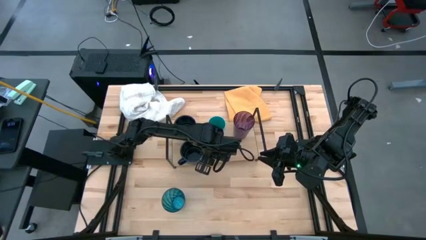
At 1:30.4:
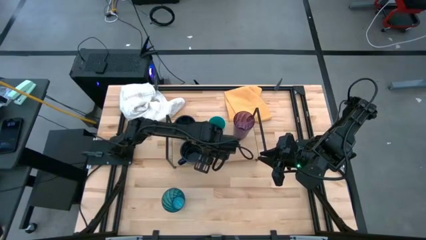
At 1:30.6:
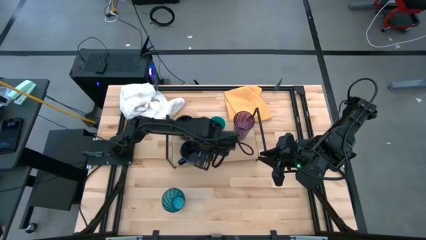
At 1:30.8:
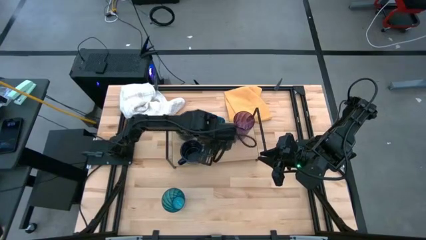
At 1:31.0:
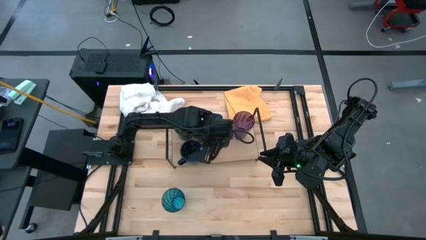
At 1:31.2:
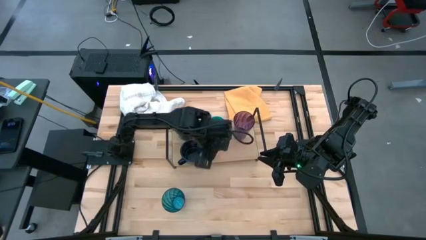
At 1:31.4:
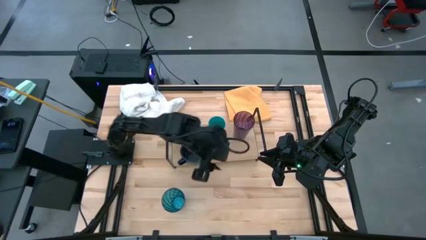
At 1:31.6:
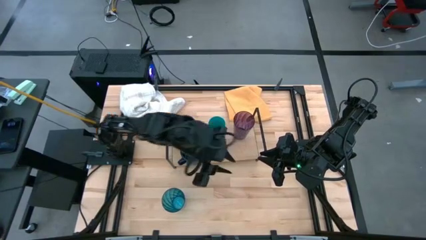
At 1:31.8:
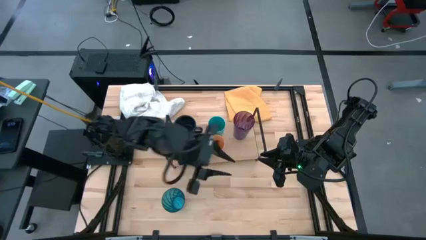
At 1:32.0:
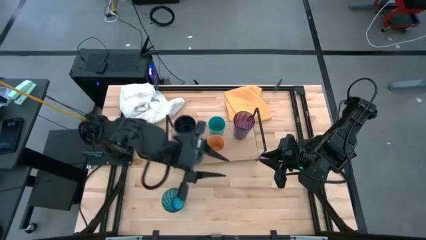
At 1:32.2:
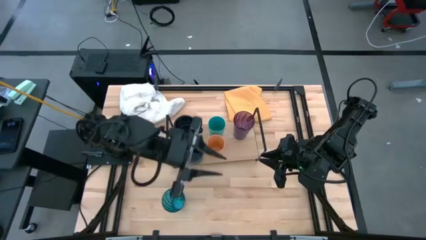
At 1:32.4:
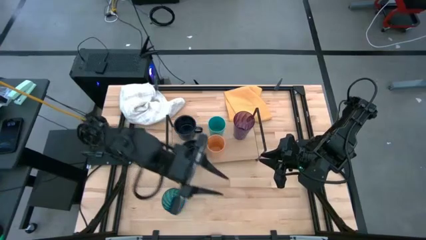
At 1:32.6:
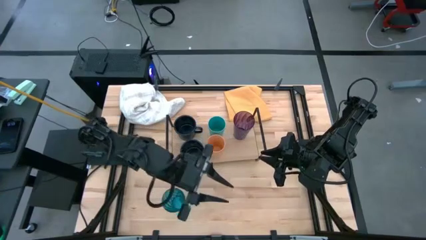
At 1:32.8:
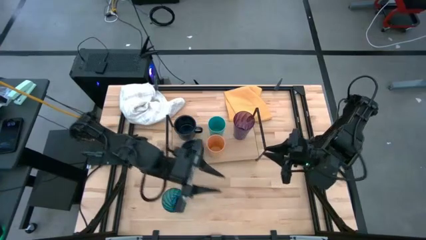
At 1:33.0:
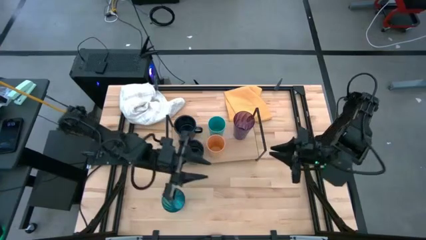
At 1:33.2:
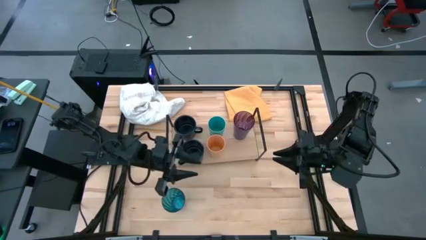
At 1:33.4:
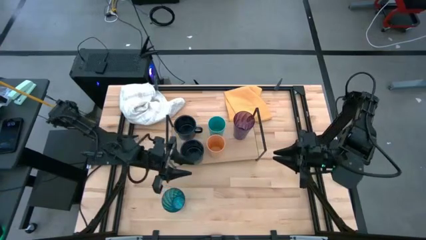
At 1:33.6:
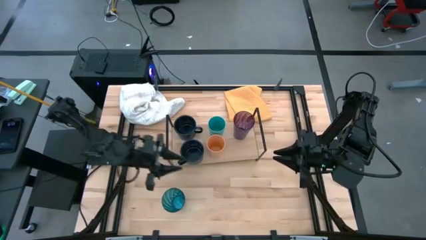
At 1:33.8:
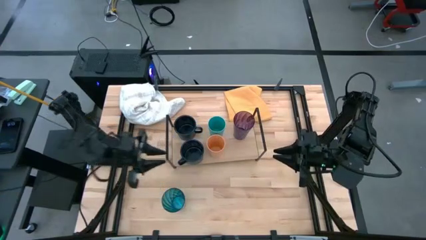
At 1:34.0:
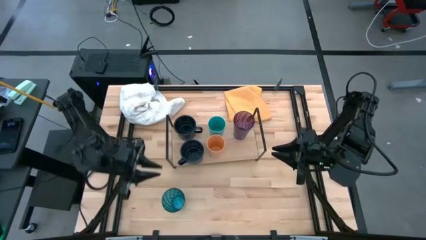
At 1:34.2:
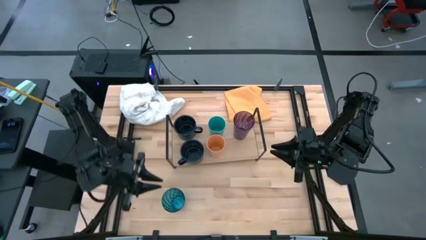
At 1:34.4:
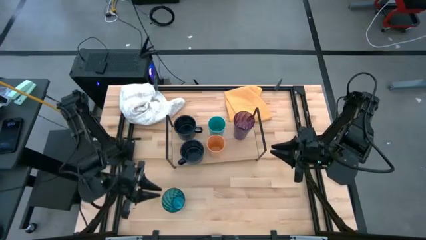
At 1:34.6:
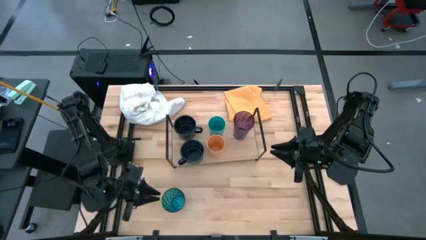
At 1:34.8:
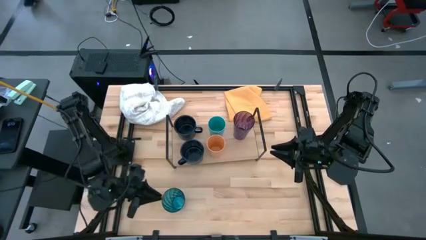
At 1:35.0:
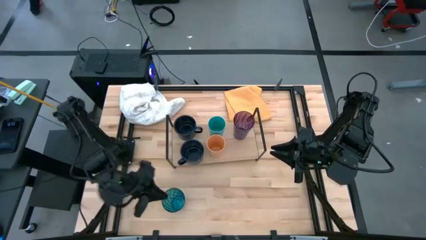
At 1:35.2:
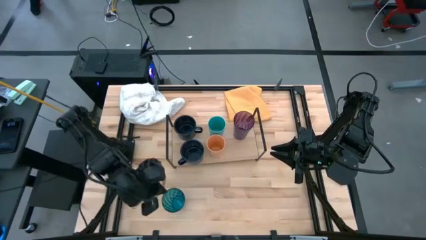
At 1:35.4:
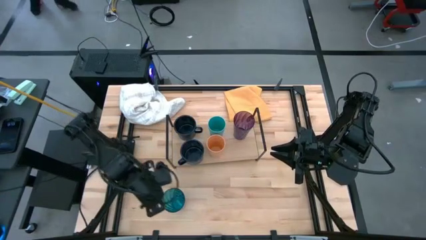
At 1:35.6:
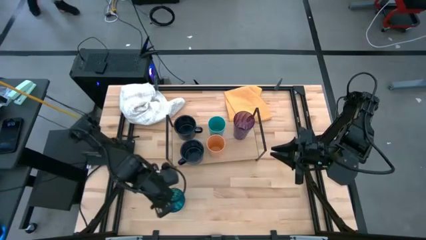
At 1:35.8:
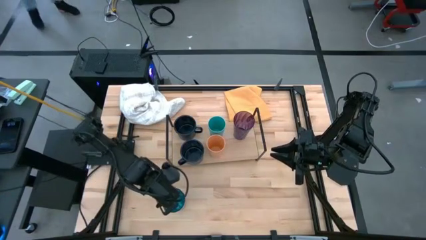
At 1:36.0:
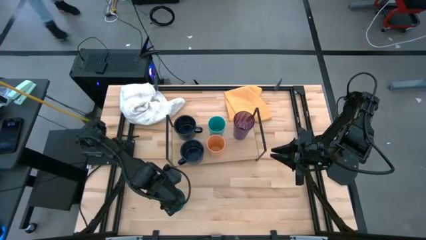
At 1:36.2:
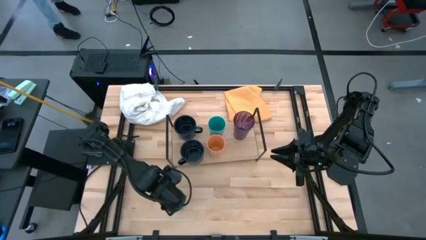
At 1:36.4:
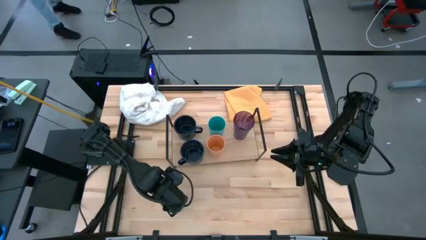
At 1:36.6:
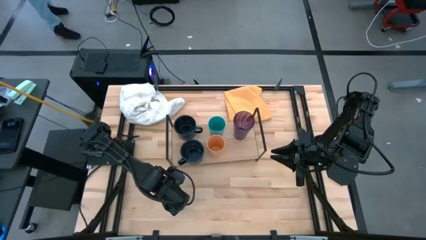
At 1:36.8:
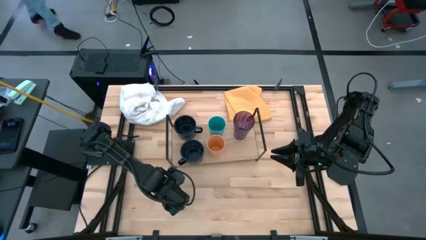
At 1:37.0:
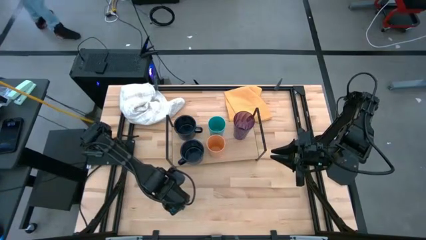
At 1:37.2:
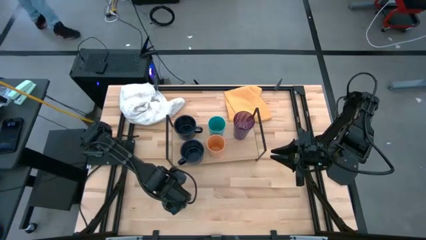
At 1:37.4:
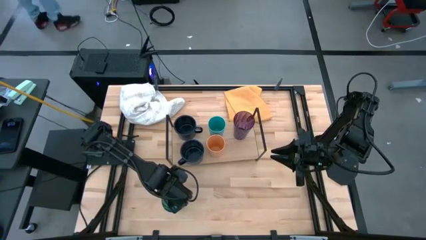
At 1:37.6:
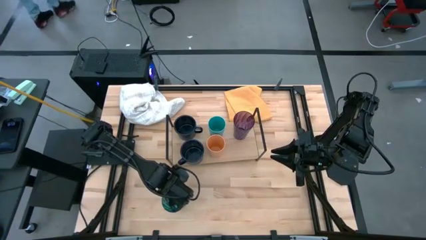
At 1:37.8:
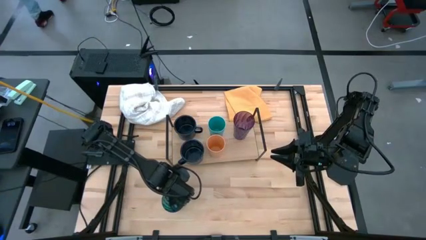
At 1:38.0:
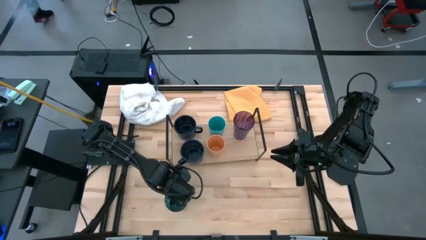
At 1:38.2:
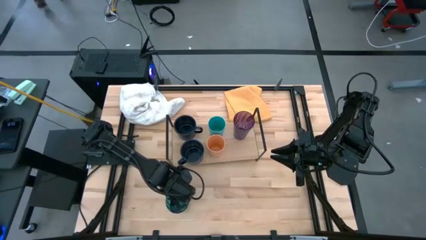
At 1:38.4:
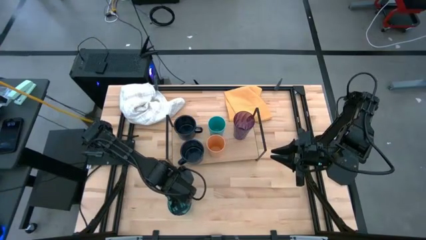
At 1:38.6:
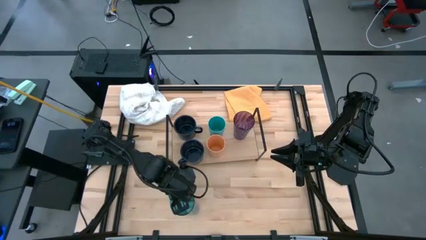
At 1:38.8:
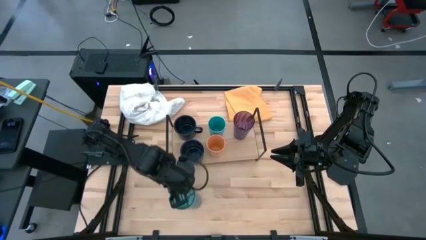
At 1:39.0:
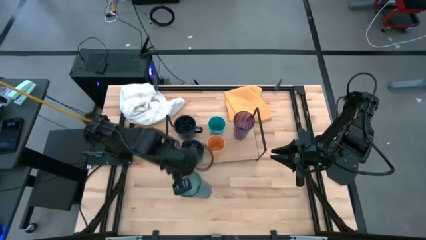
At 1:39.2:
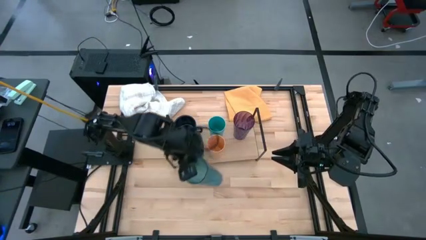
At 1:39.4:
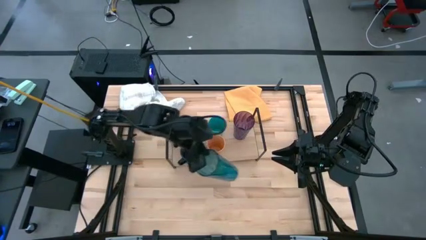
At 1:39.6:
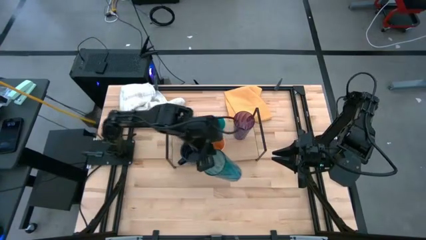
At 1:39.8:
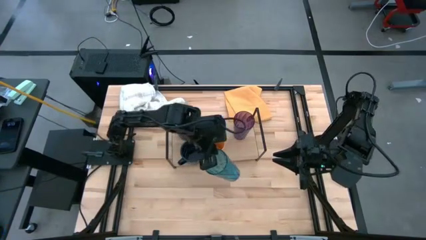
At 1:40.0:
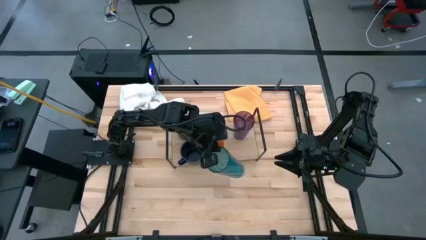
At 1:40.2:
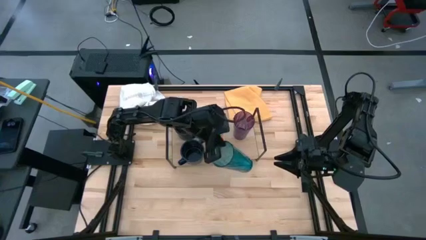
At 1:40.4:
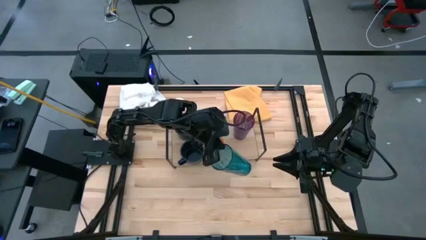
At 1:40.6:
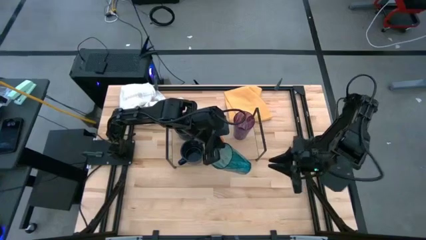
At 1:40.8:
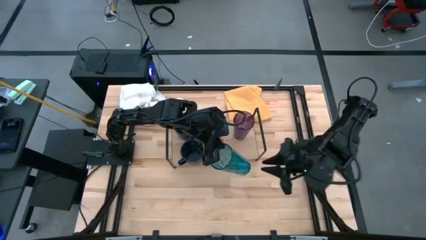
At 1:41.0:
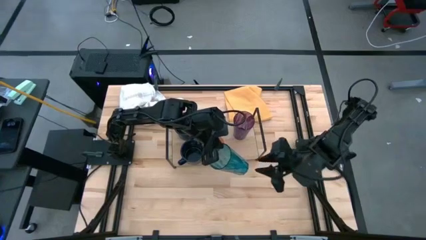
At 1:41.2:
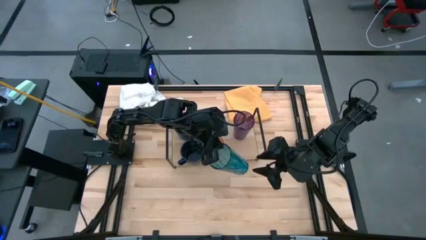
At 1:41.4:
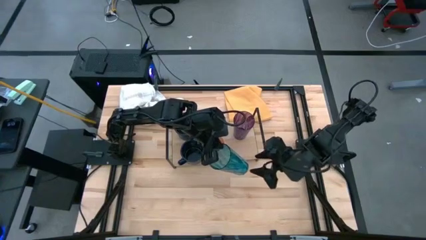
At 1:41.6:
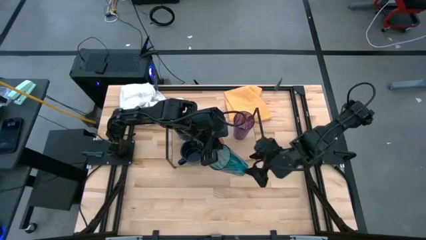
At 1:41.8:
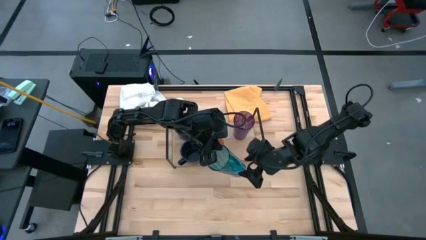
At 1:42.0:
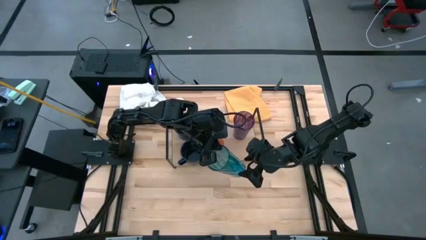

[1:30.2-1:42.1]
Task: Stack small to large cups/mugs on shelf
Put the blue cup on the shelf

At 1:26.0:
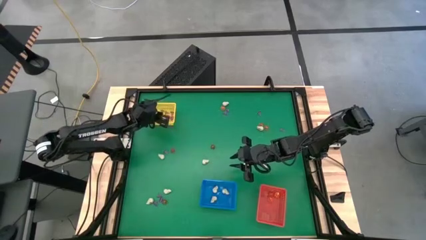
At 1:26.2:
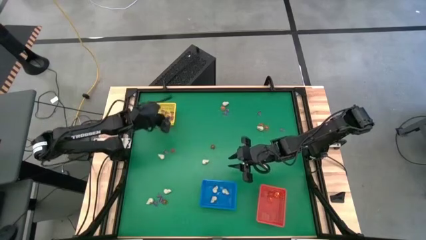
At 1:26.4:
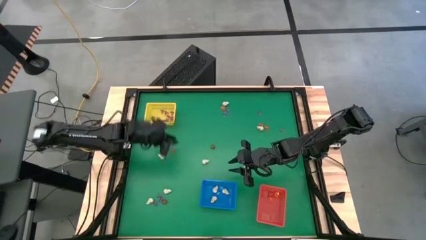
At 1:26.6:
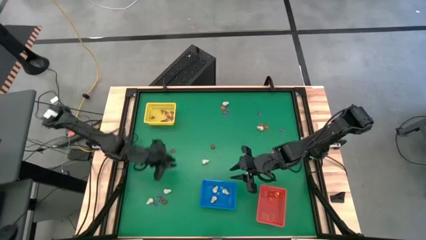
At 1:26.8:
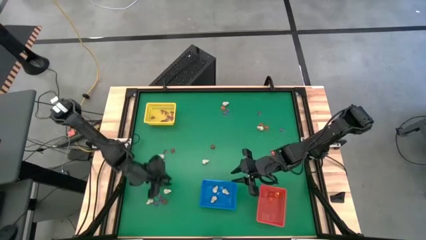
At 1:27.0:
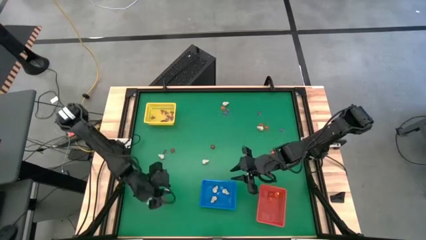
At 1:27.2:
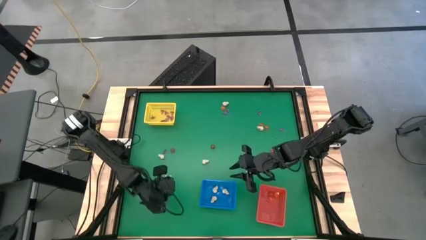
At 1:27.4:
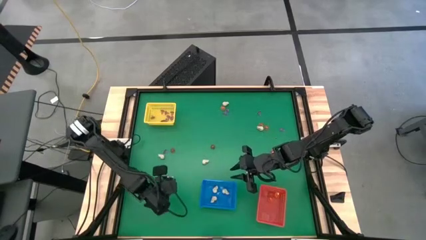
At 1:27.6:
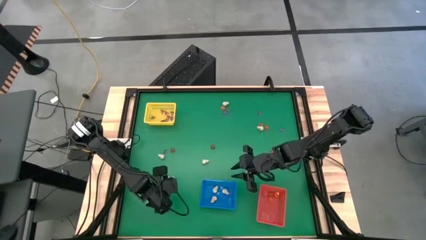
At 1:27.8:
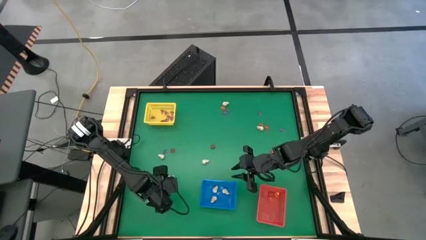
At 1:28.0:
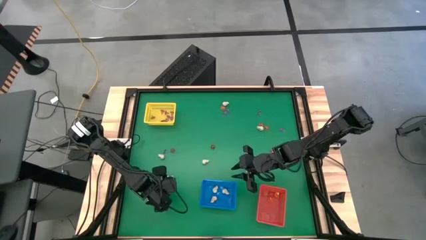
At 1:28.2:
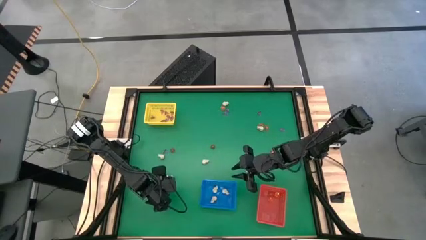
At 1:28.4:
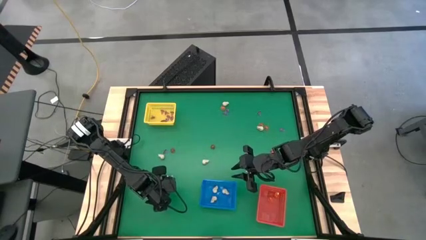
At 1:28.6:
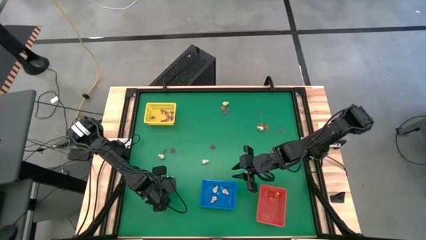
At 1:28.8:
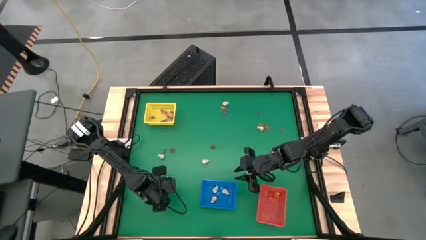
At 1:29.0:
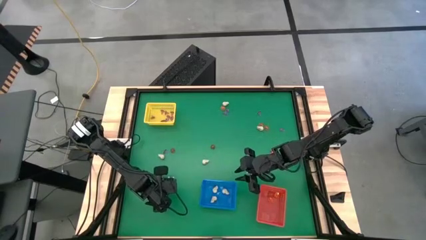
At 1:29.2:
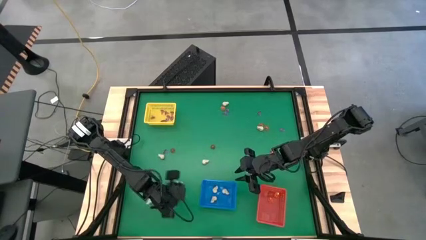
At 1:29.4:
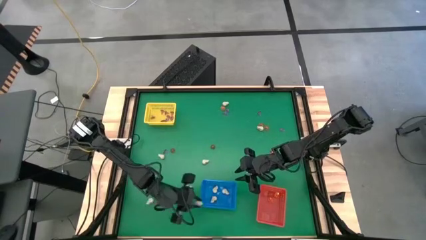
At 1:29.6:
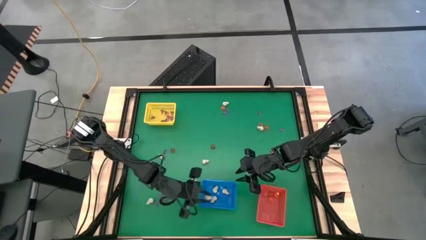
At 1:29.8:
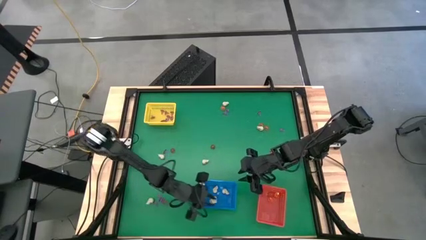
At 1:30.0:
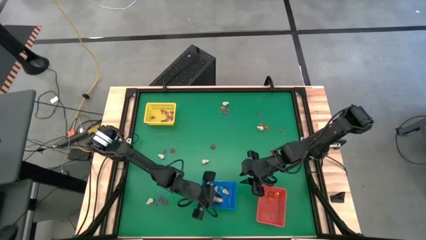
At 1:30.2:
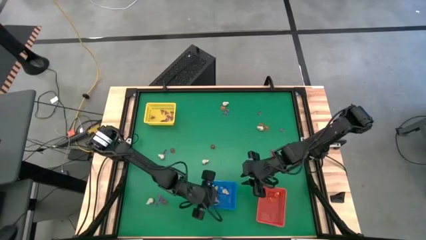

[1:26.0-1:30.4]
Task: Sort Halloween decoration
Put the white skull toy into the blue basket
